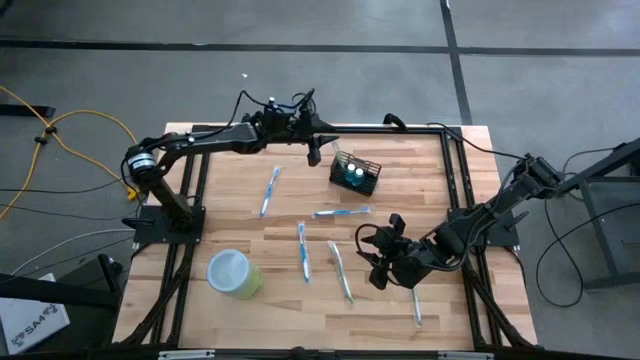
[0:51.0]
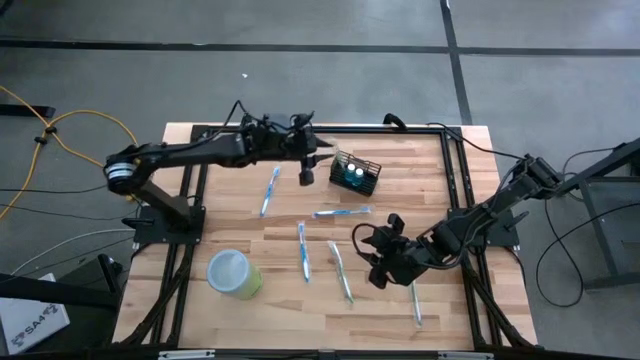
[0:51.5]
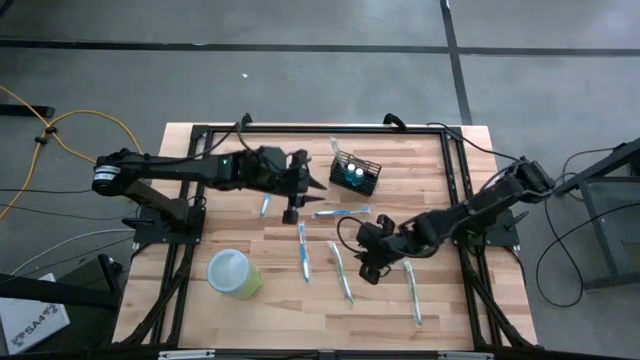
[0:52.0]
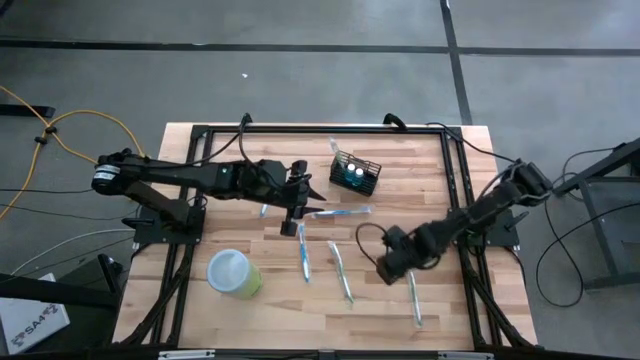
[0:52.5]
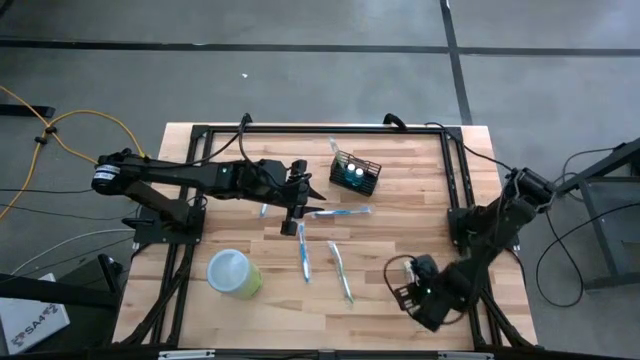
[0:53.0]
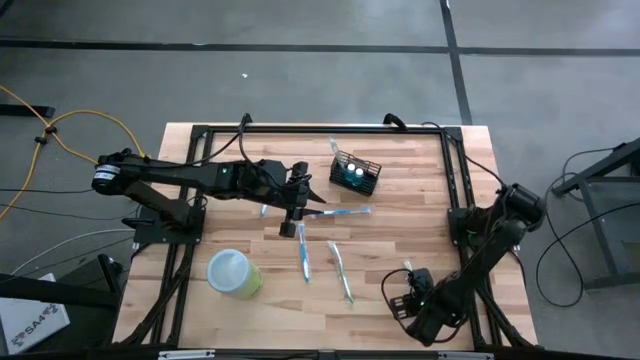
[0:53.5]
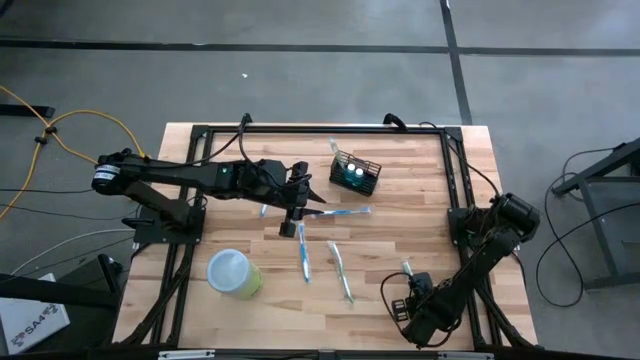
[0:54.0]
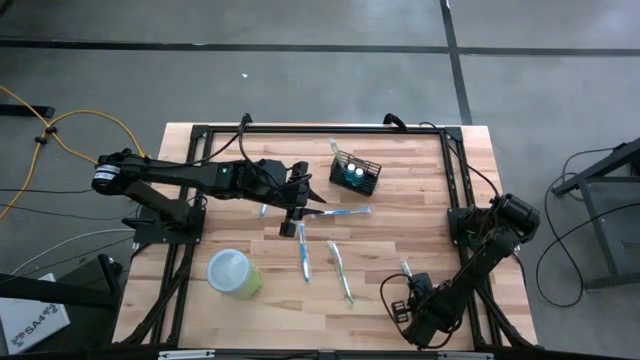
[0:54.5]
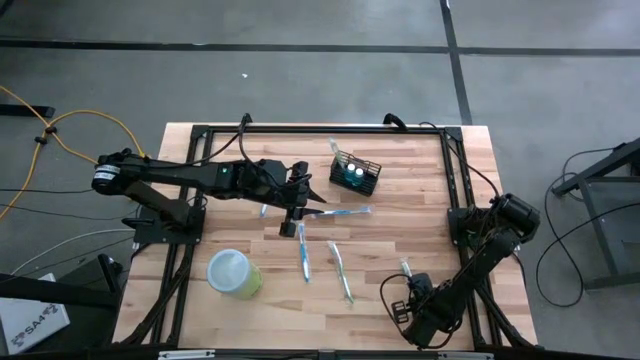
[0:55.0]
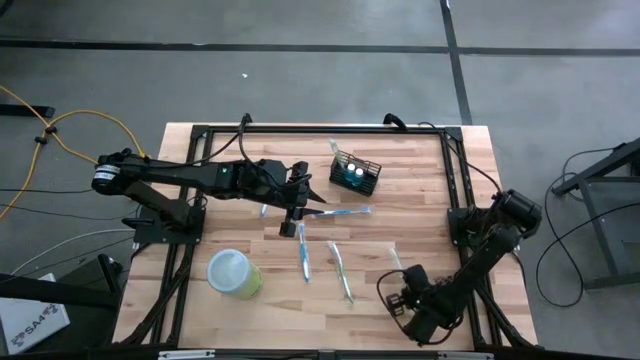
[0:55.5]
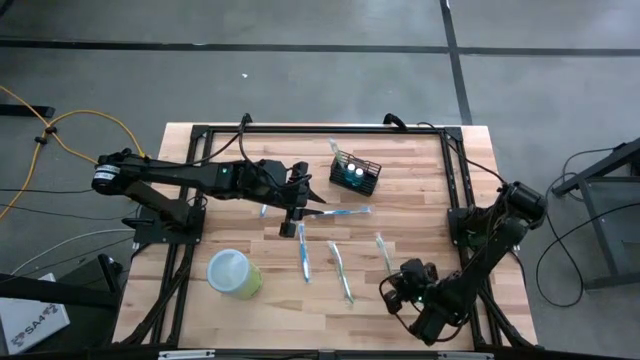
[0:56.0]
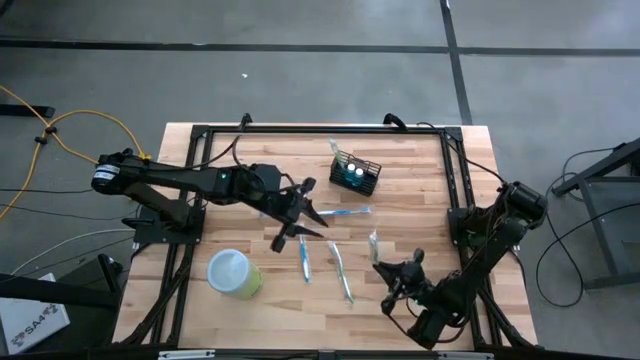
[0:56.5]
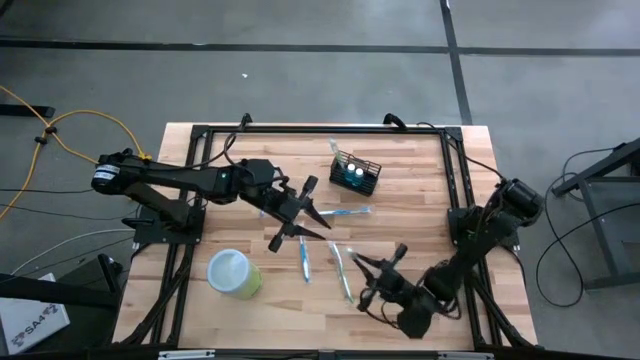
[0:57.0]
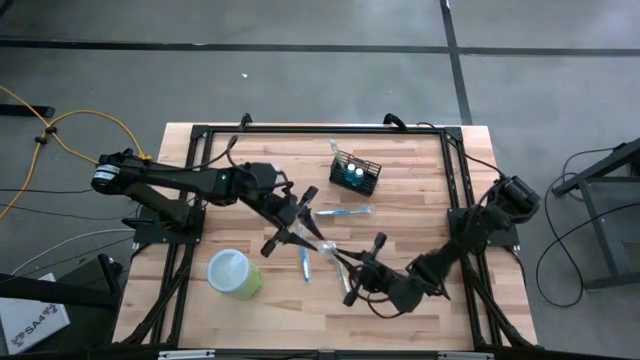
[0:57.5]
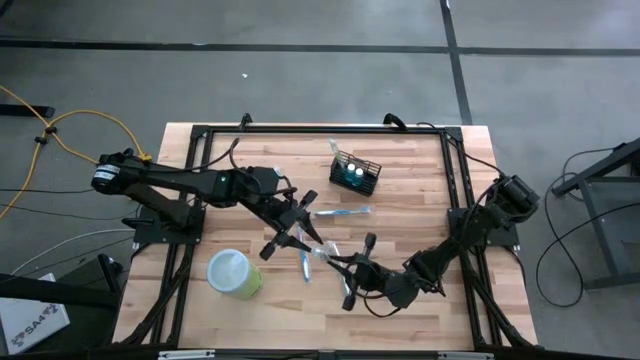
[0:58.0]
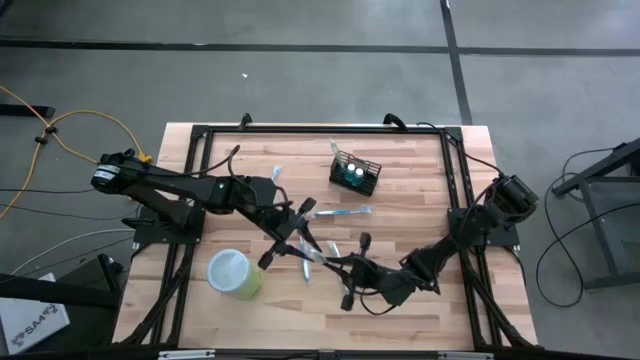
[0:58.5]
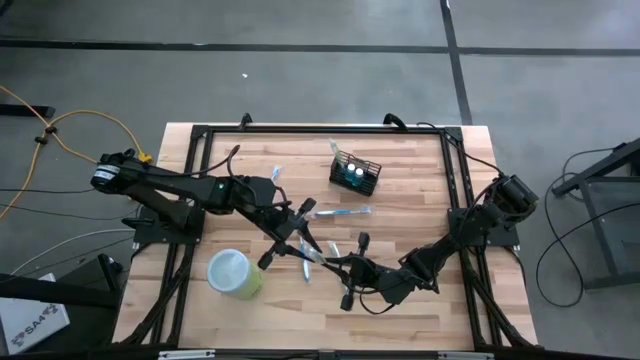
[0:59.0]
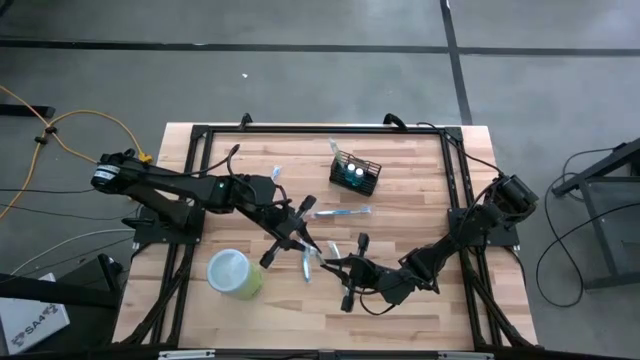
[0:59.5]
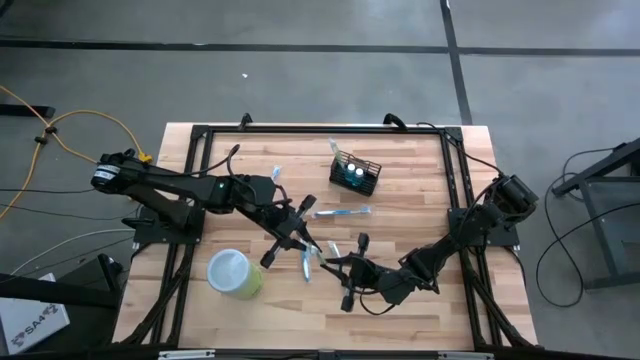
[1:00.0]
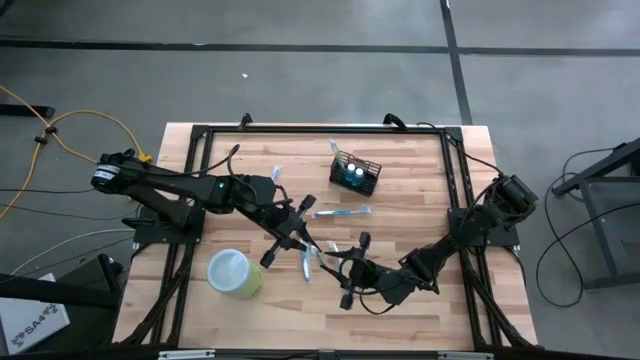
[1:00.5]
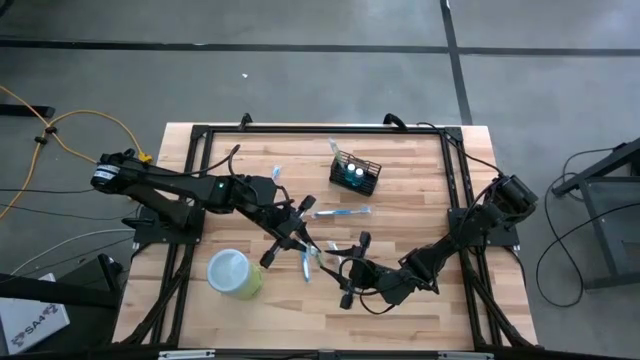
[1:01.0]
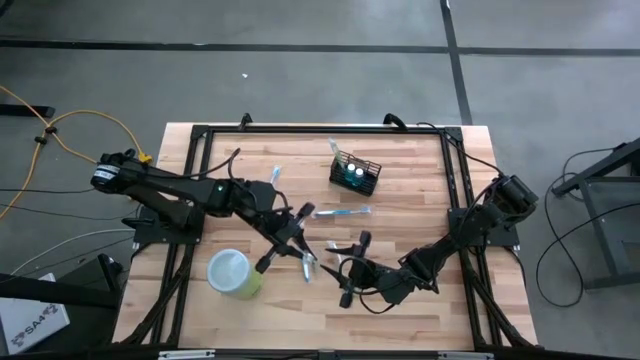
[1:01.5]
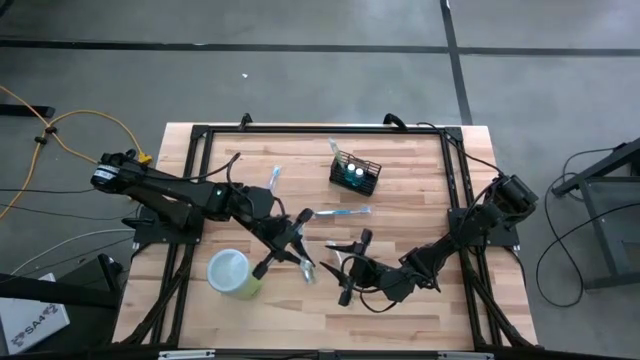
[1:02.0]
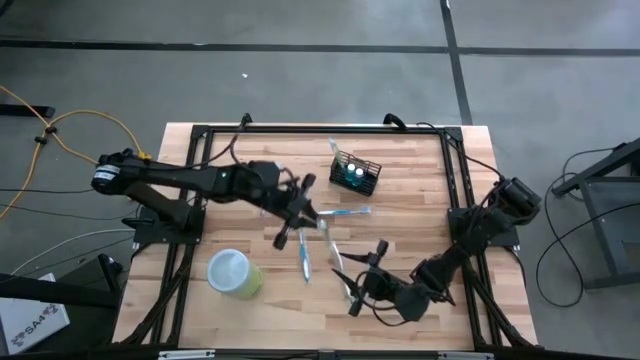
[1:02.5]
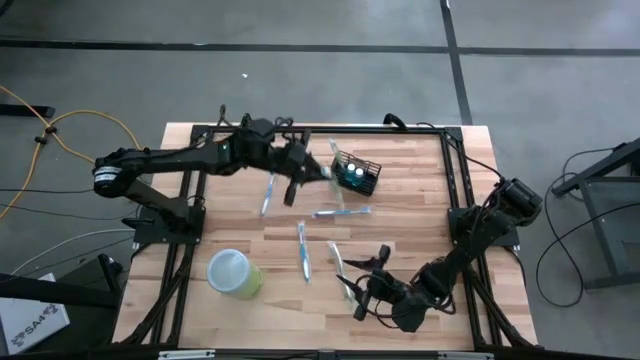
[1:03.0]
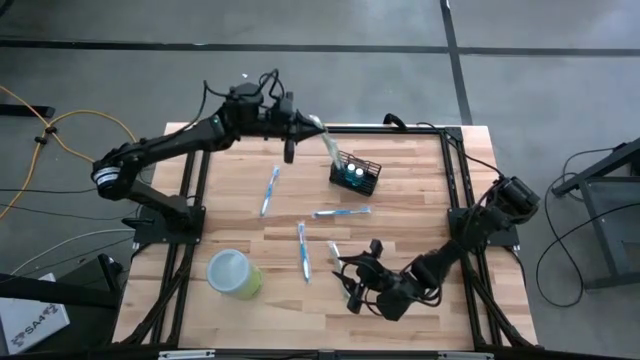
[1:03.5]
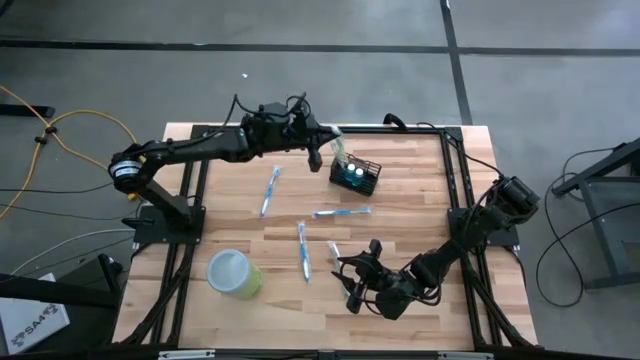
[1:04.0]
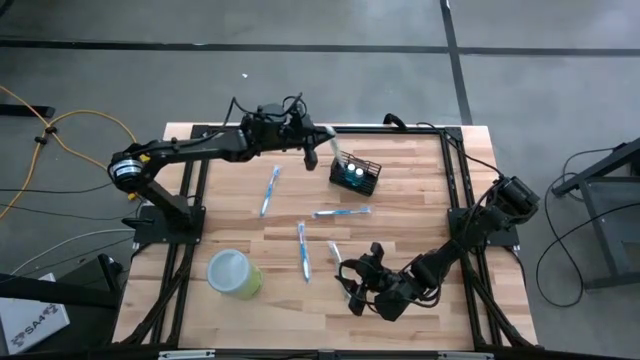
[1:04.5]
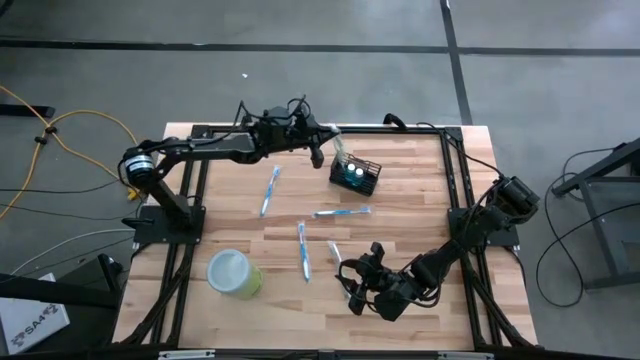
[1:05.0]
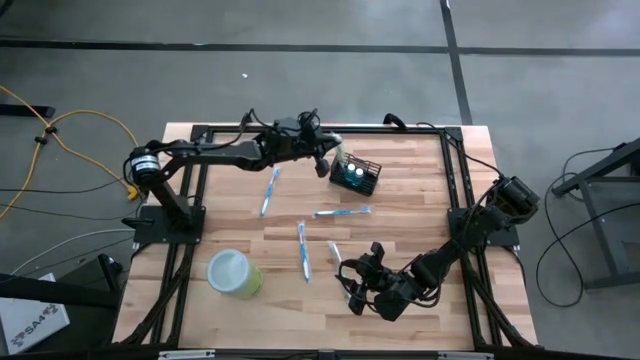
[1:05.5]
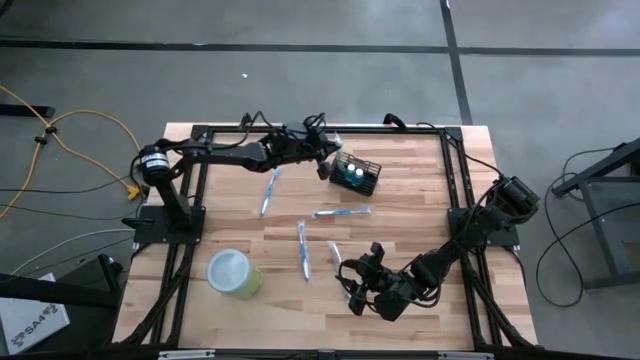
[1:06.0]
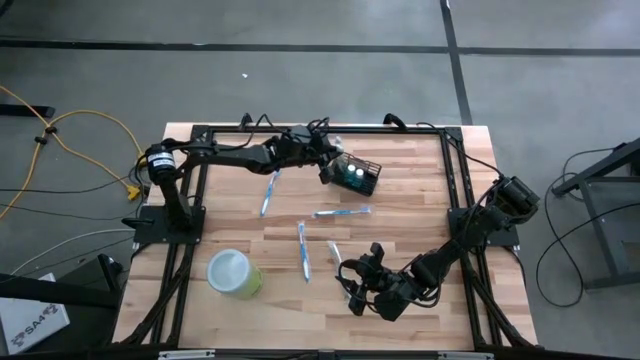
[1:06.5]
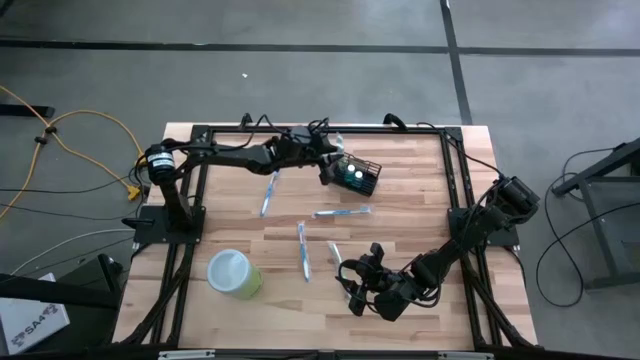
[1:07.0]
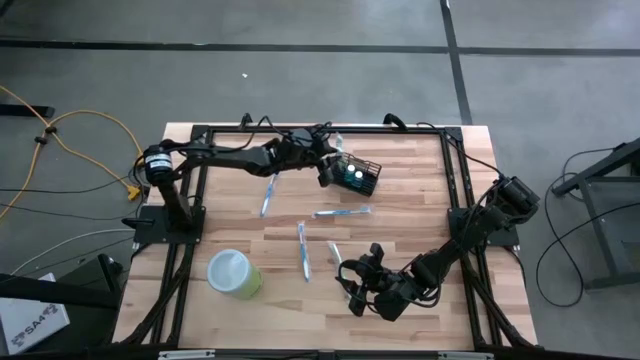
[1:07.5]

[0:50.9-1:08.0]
Task: Pick & Place toothbrushing station
Put the right green toothbrush into the left section of the black mesh organizer

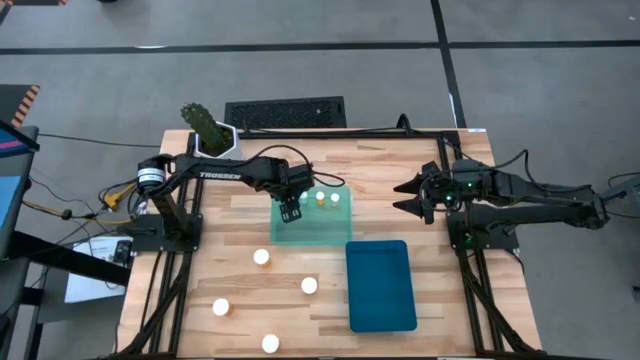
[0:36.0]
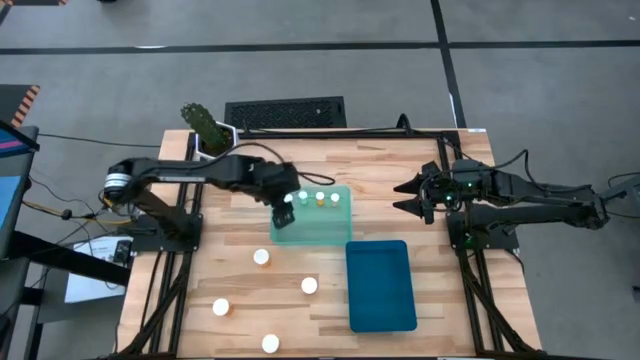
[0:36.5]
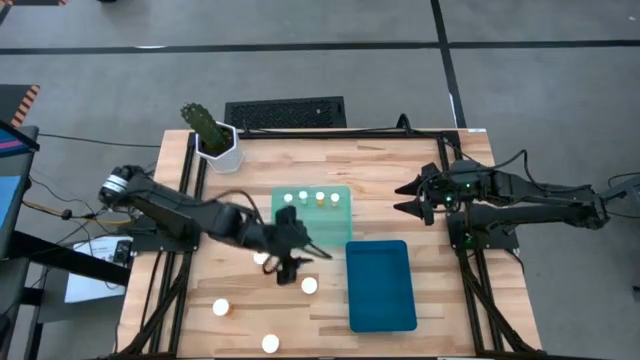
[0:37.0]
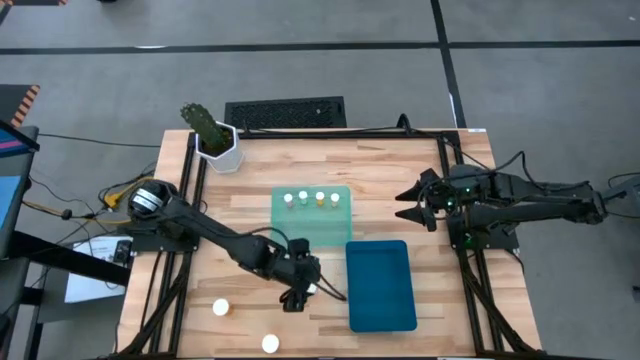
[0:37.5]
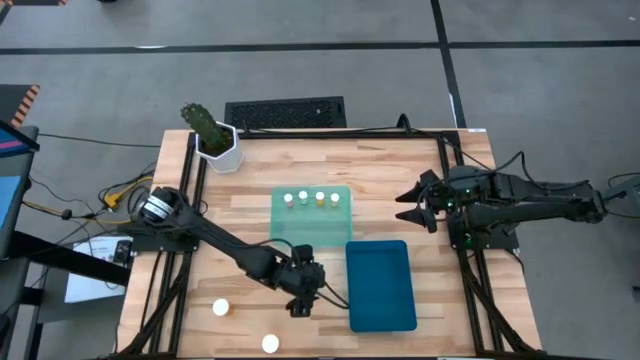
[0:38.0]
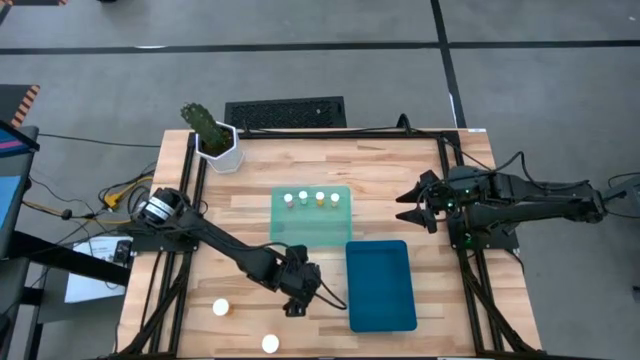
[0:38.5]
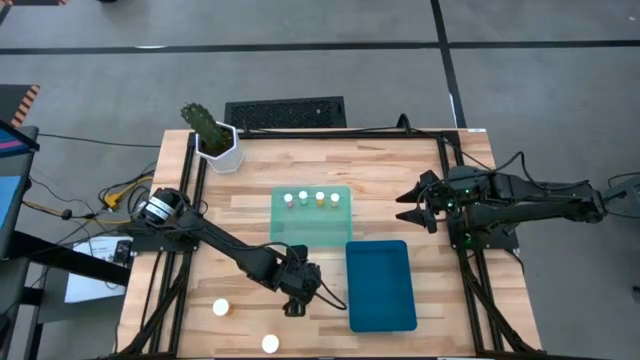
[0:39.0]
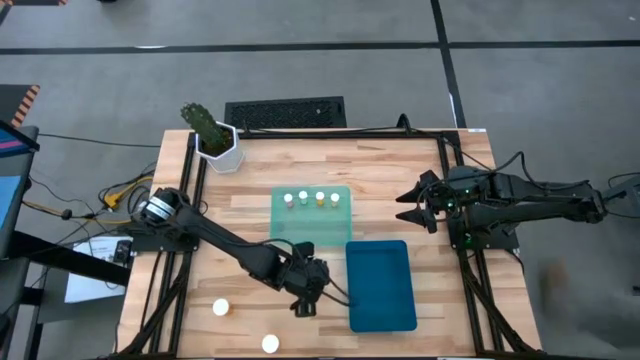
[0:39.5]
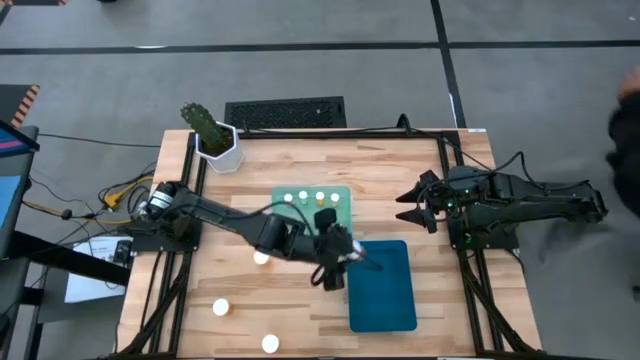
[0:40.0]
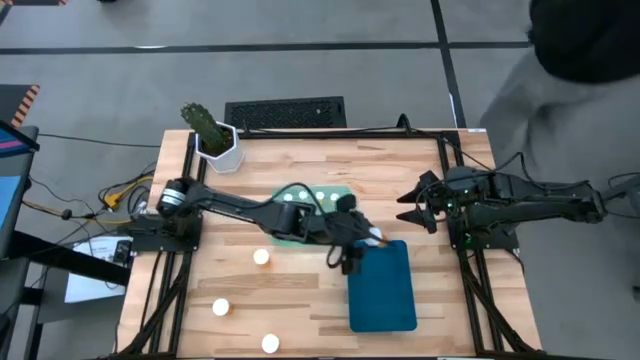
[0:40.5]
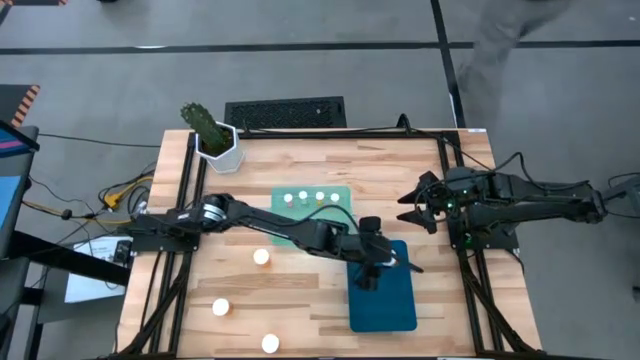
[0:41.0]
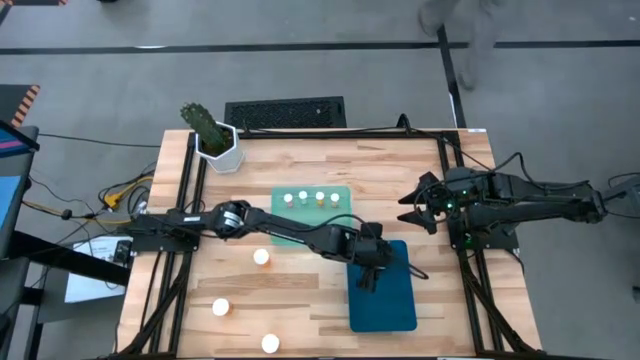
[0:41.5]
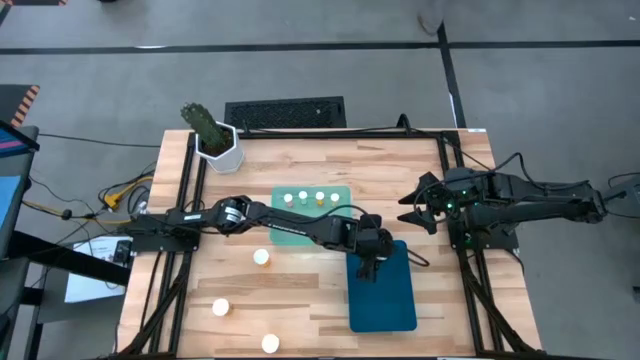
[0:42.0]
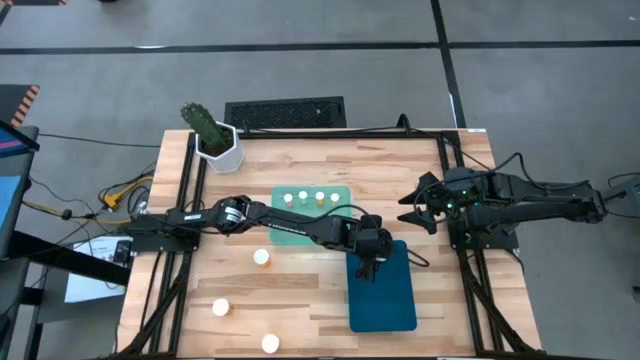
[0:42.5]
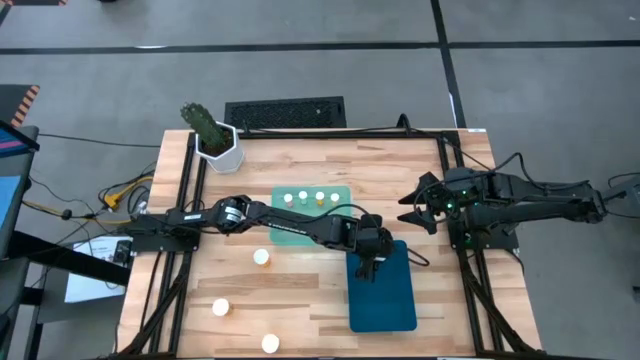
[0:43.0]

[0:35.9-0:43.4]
Task: Pick and place medicine bottles into bin by pill shape (circle, oval)
Put the large orange pill bottle into the blue bin
